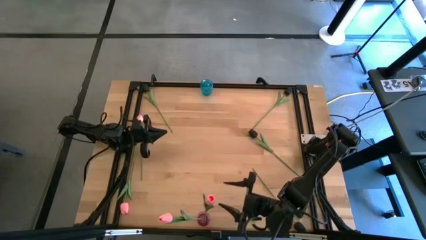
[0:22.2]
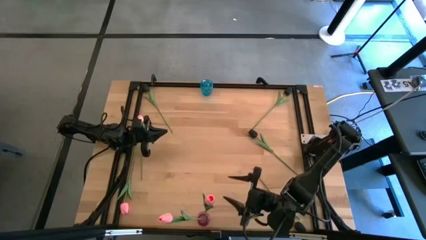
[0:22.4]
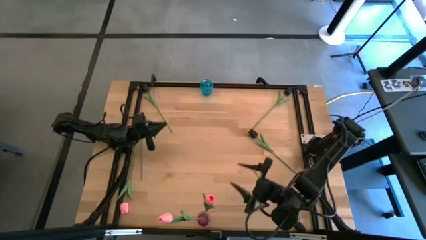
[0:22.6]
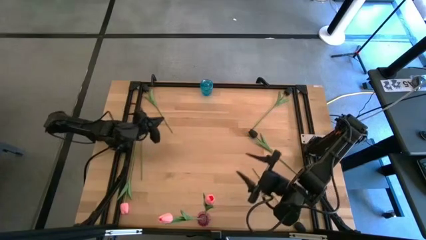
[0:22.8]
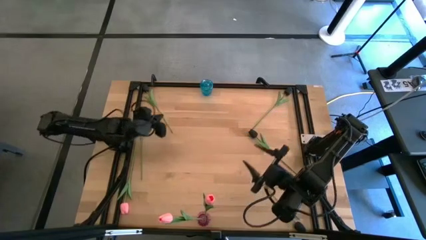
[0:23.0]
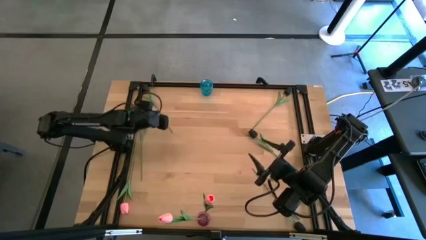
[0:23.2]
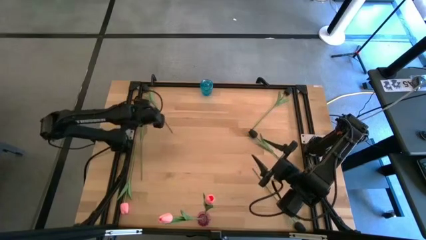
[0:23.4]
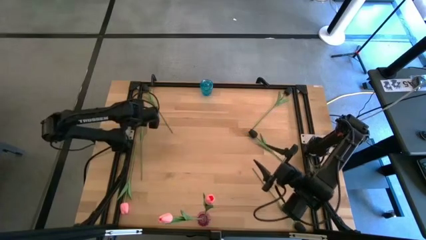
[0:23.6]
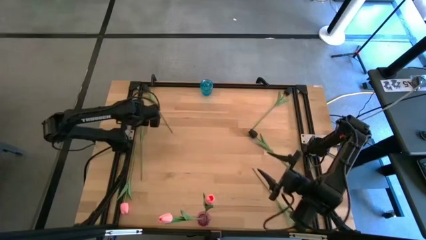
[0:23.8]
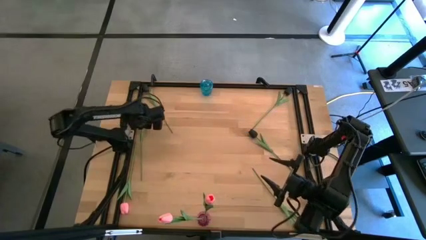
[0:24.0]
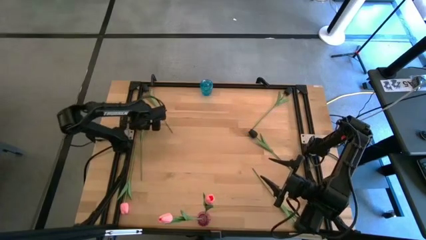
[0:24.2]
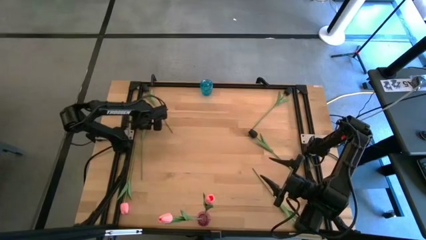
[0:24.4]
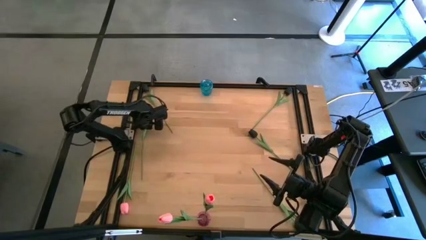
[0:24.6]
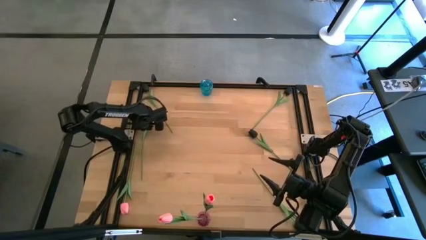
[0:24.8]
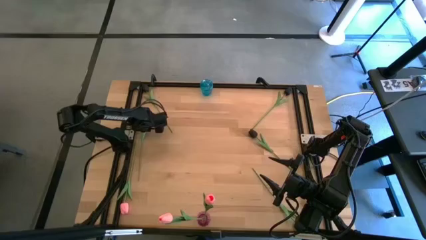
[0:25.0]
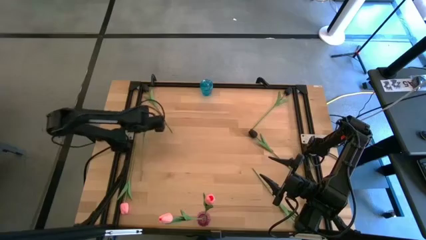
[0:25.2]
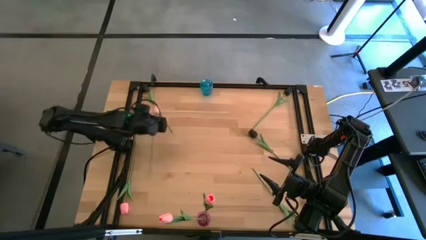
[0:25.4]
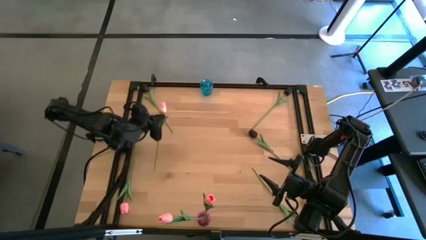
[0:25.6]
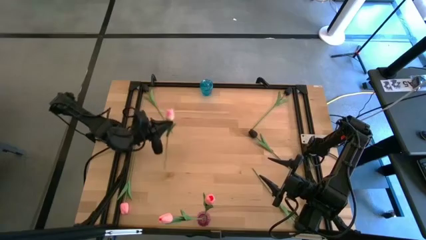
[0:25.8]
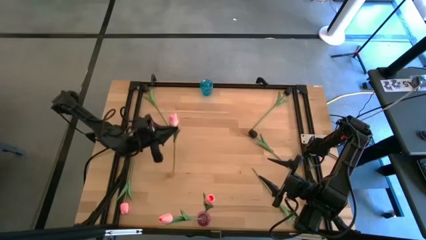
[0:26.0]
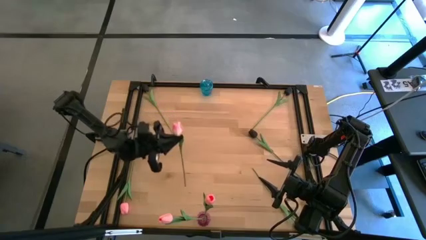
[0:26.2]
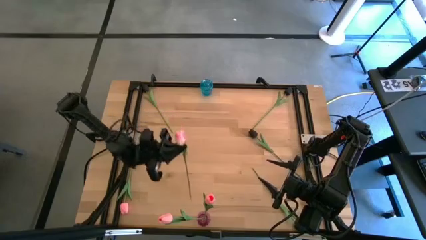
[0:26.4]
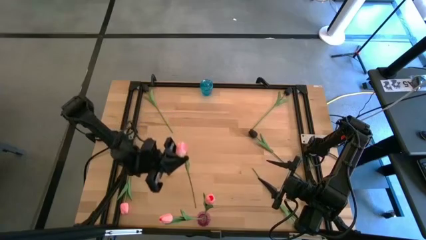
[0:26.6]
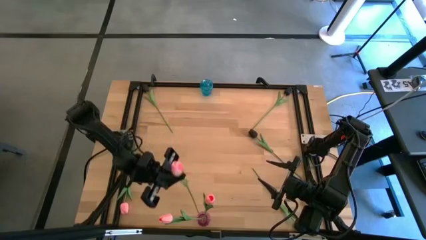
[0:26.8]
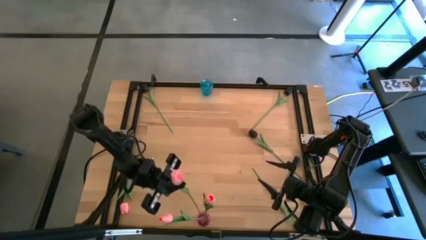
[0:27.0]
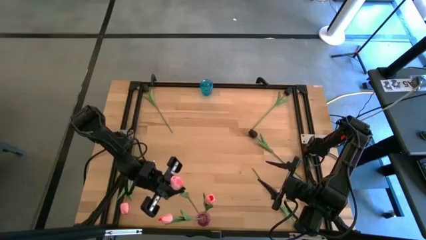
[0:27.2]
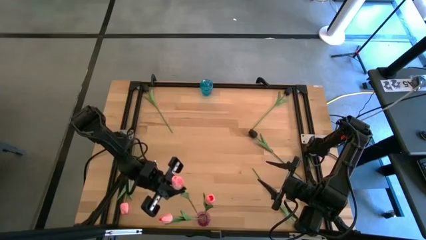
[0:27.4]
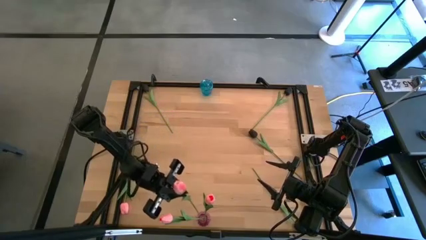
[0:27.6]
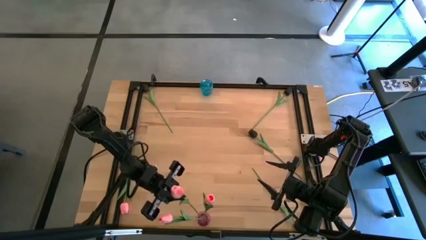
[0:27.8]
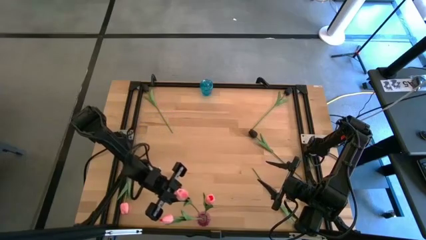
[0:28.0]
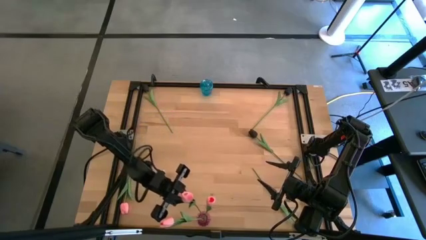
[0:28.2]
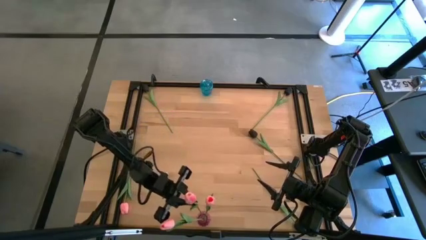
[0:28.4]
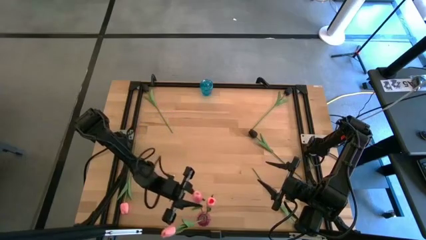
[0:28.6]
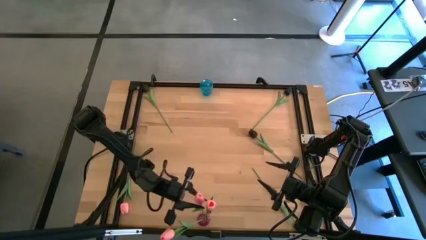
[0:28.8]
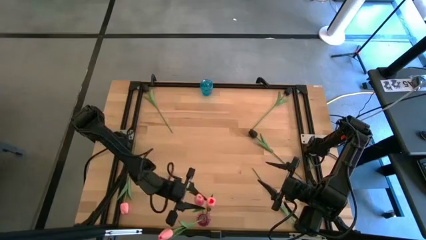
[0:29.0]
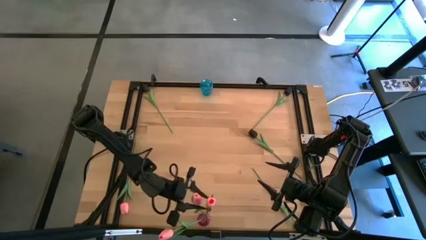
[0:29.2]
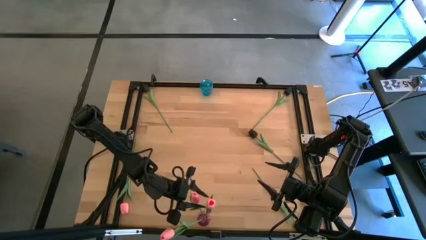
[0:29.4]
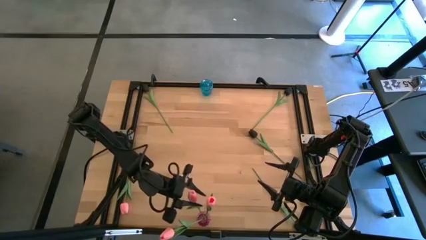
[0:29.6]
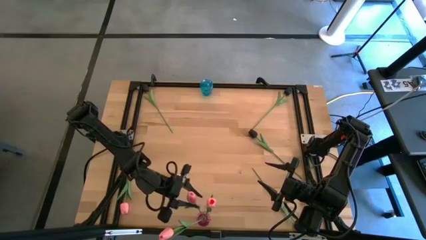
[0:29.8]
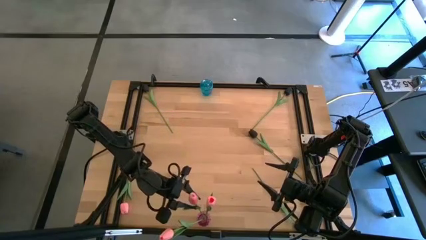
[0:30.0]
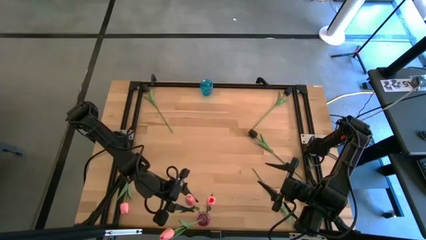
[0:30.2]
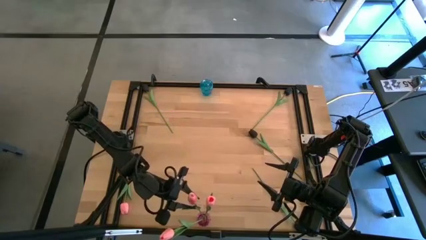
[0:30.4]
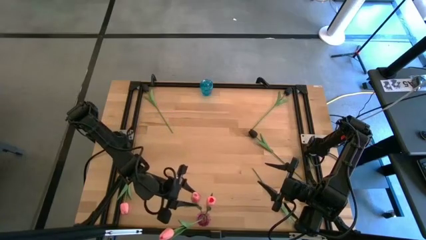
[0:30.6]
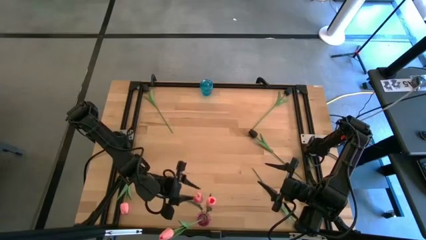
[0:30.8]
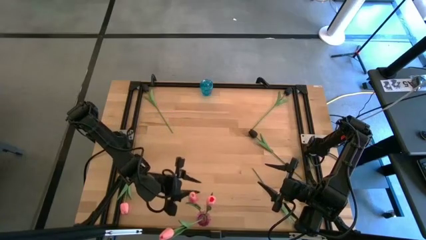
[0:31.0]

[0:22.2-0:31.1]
Task: Sort flowers into vase by color
Put the top pink flower into the violet vase

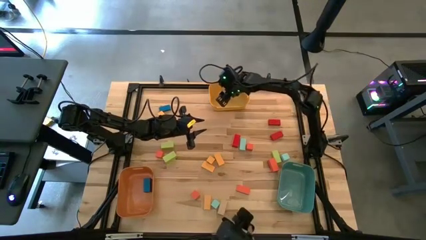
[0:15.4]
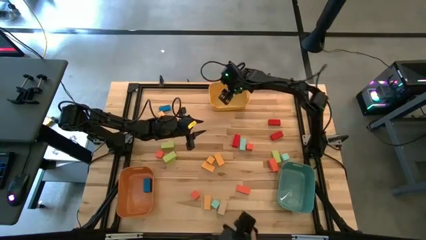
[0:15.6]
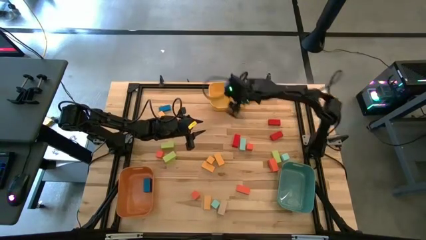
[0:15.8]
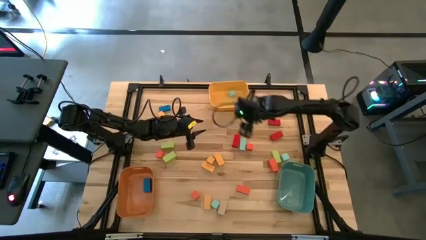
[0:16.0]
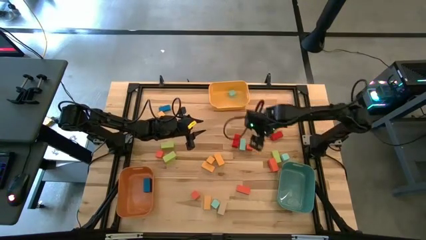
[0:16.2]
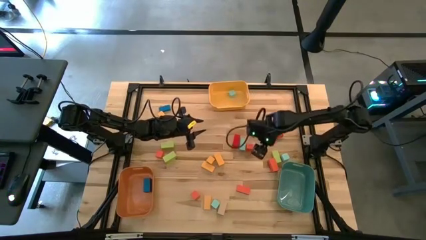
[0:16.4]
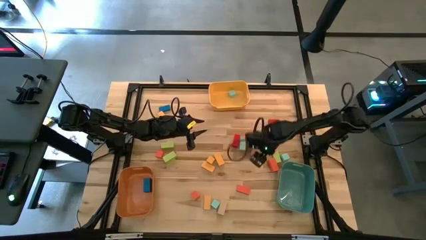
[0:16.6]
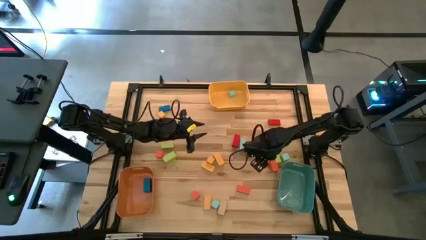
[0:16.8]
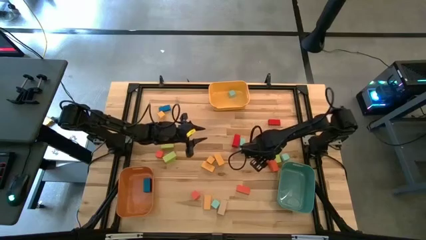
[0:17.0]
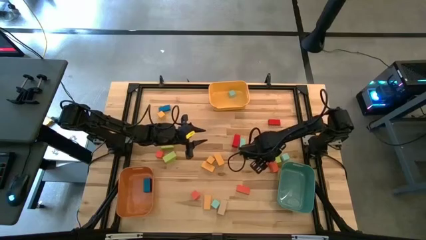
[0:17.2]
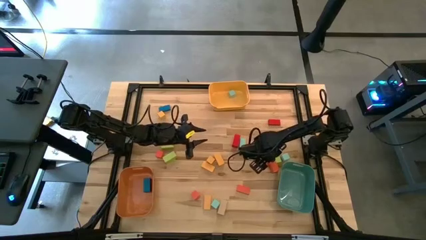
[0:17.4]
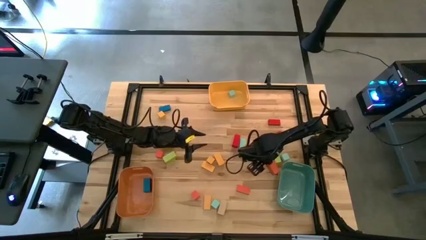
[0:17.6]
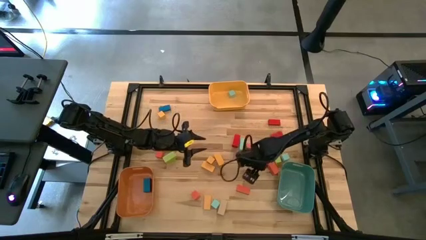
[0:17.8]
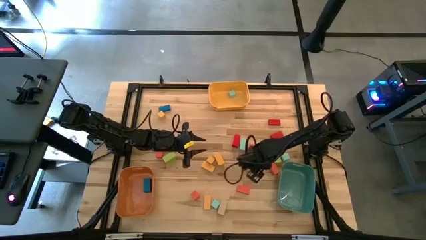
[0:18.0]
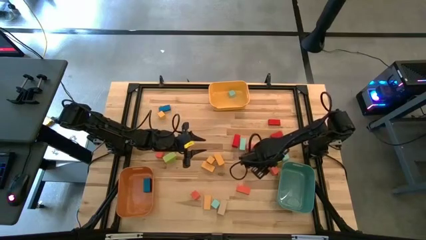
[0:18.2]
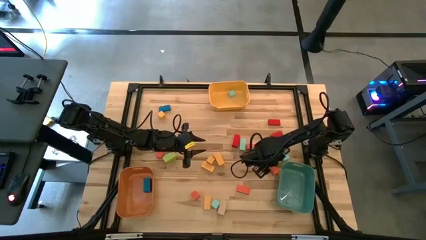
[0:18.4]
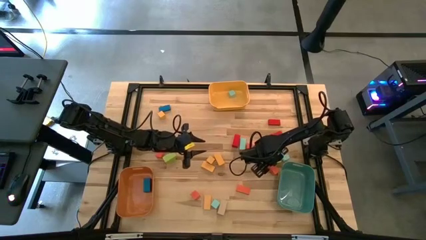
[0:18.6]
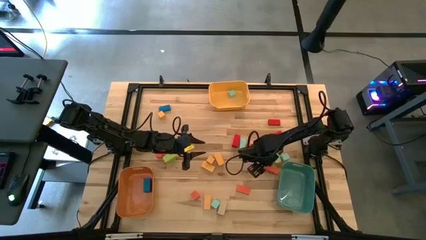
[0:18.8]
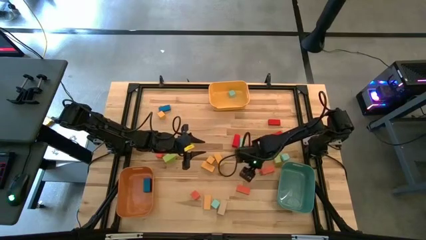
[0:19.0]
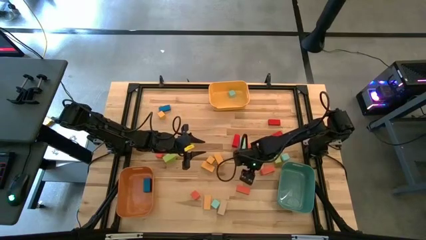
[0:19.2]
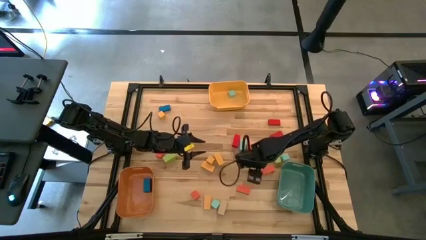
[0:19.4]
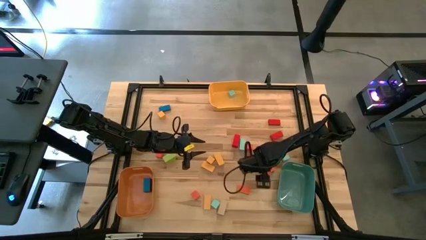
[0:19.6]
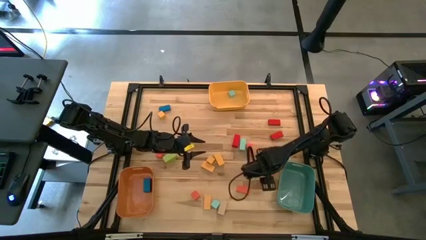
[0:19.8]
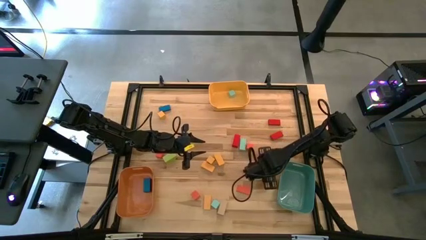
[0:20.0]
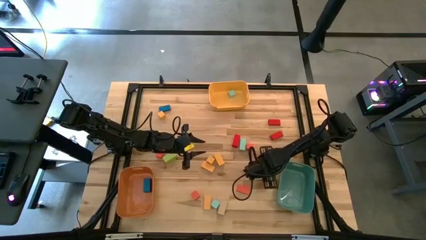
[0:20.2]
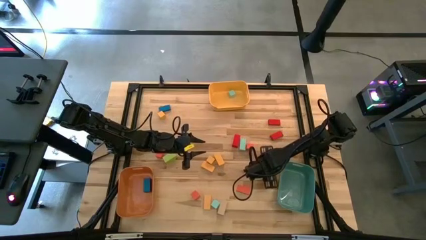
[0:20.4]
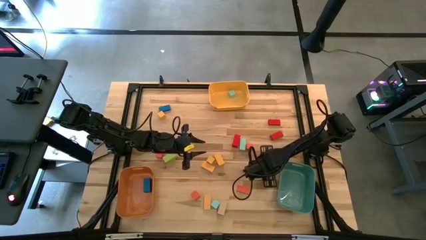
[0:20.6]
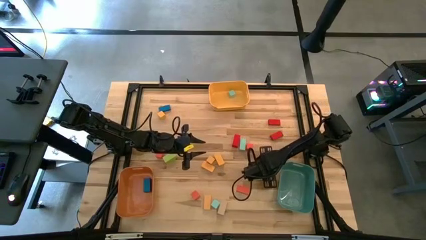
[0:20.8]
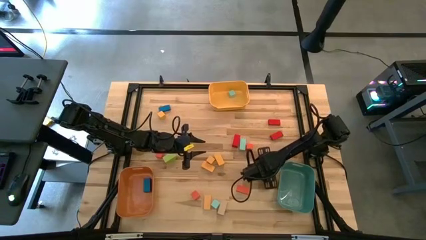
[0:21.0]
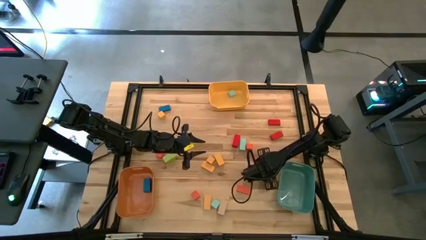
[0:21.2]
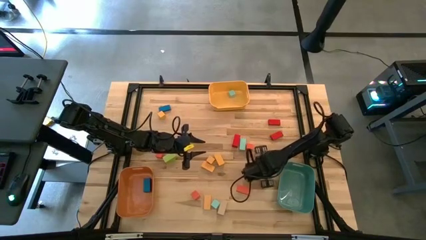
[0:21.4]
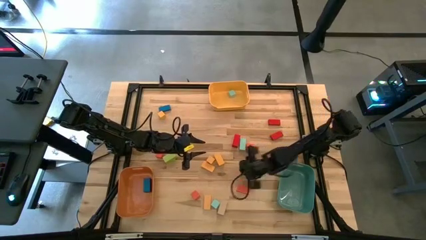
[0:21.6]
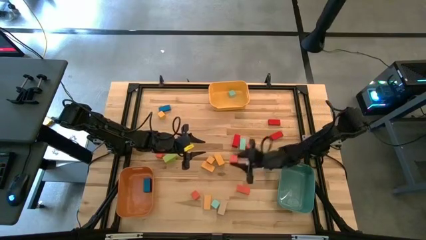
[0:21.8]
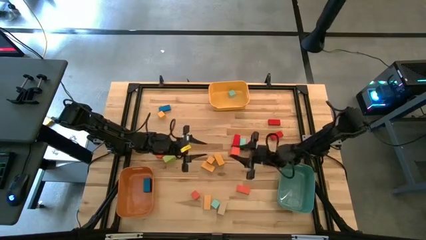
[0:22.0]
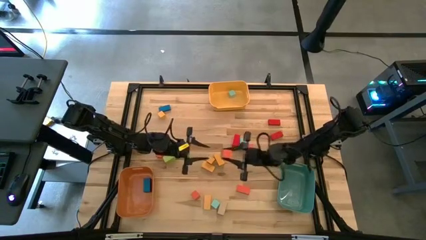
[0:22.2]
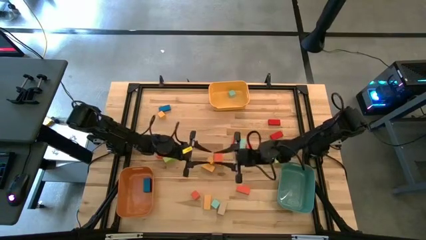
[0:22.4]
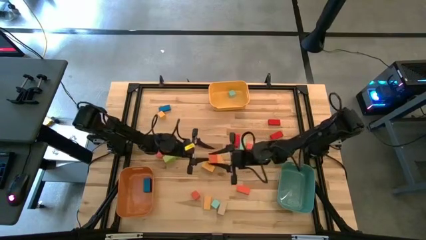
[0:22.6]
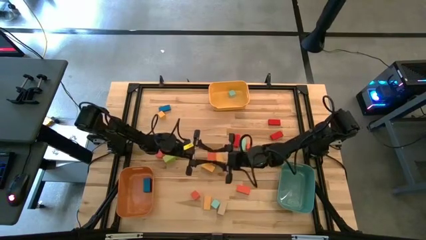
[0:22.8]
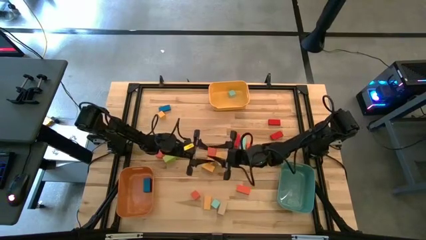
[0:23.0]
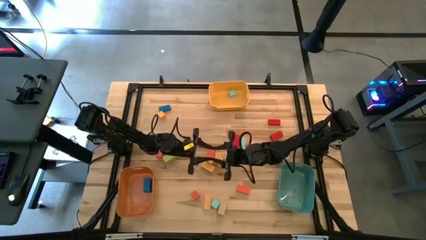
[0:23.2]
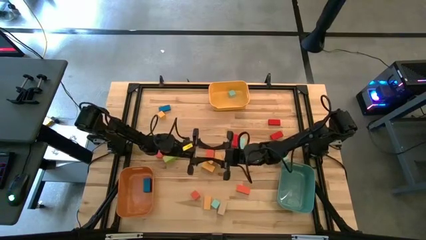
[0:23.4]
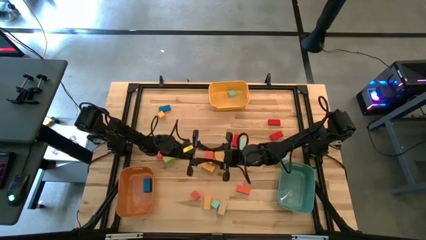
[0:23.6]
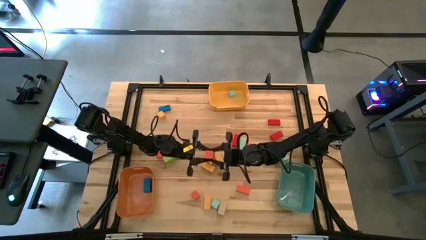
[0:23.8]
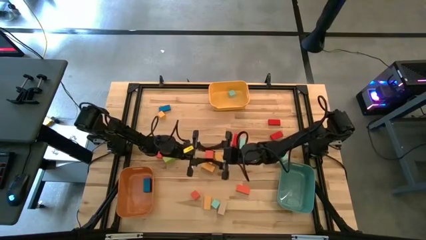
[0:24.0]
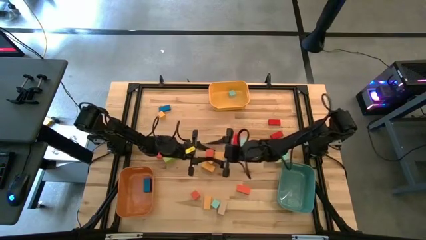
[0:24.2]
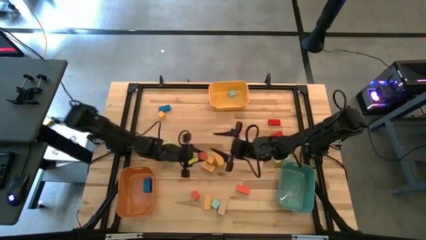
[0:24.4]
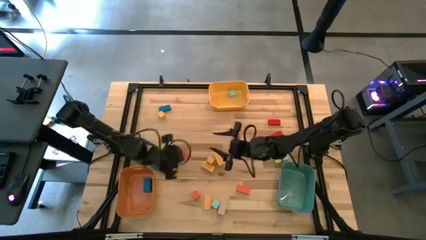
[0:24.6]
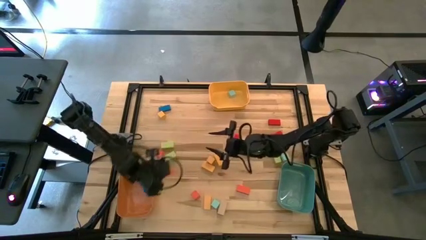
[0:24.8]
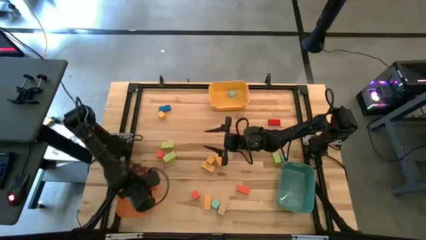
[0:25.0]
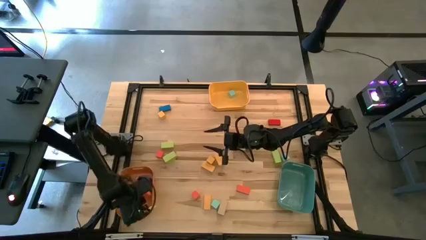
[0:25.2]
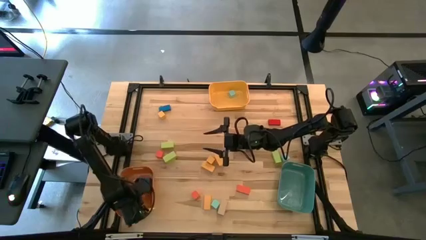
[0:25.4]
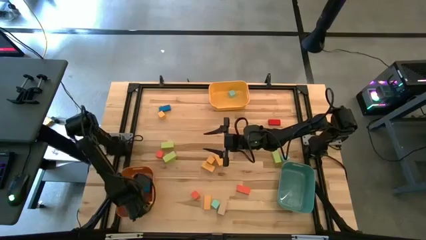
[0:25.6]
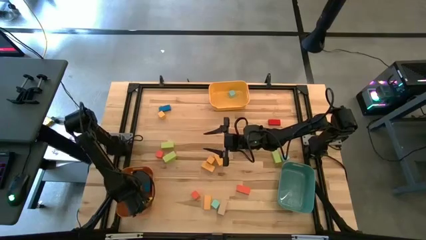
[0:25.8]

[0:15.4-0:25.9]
Task: Sort blocks by size
Put the thick orange block into the orange bin
